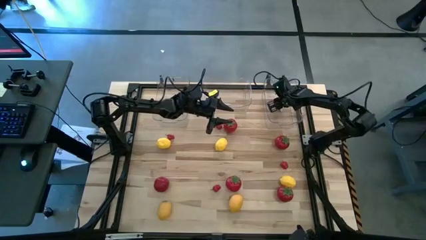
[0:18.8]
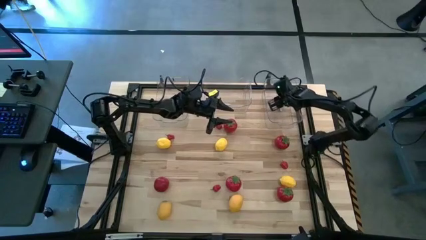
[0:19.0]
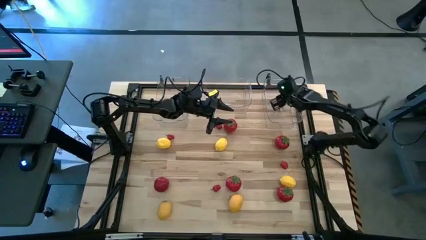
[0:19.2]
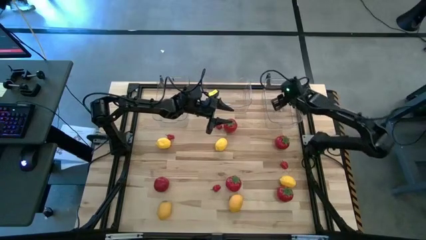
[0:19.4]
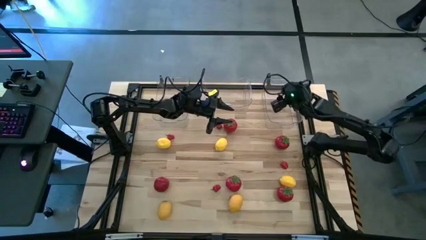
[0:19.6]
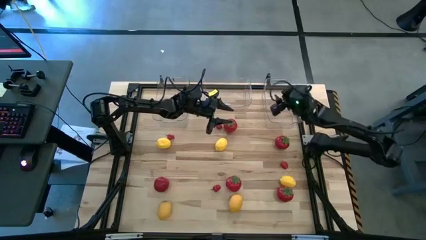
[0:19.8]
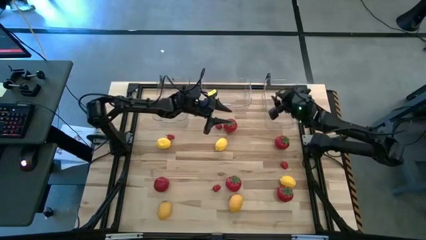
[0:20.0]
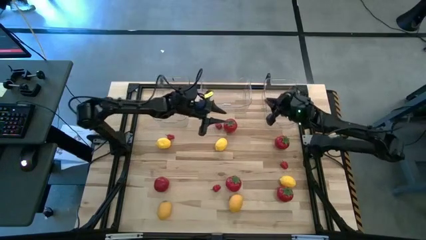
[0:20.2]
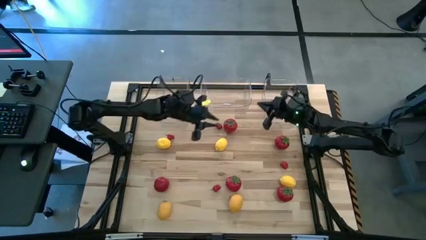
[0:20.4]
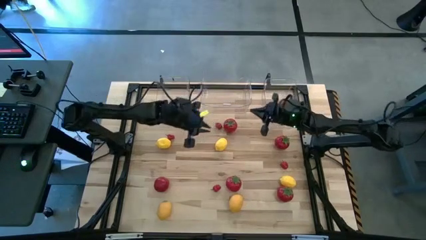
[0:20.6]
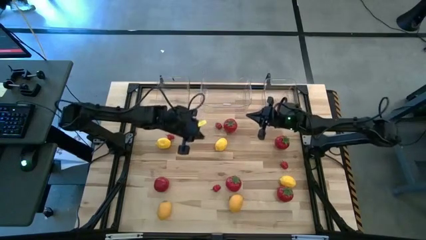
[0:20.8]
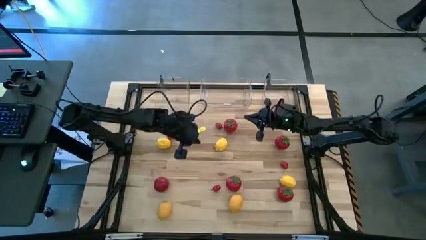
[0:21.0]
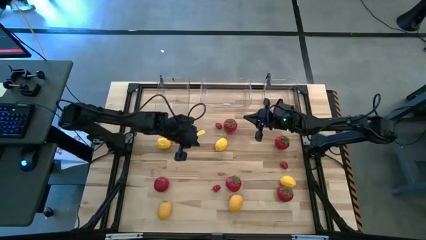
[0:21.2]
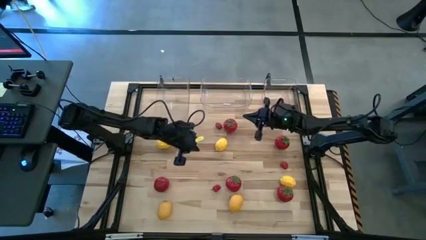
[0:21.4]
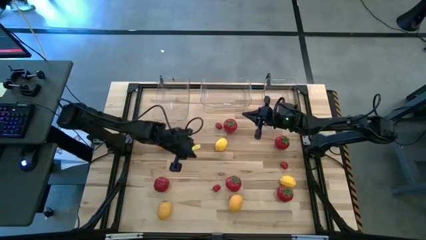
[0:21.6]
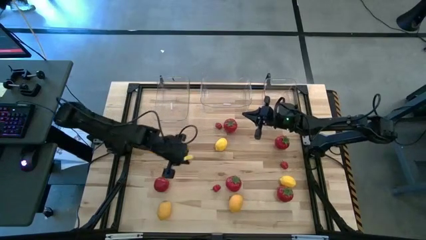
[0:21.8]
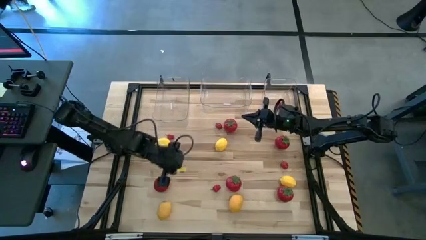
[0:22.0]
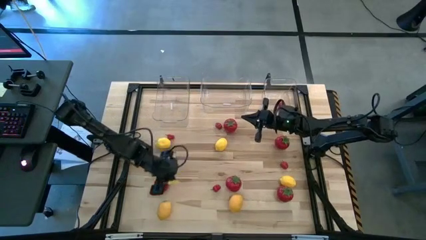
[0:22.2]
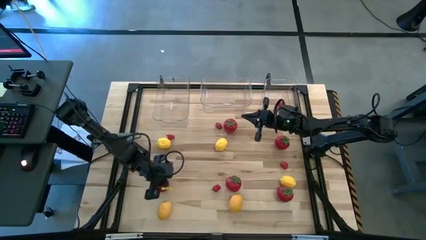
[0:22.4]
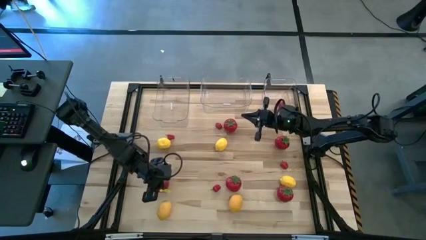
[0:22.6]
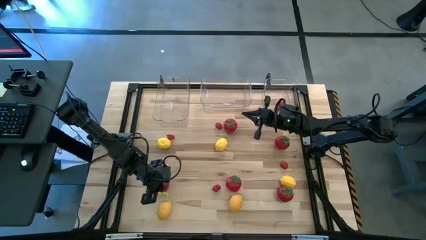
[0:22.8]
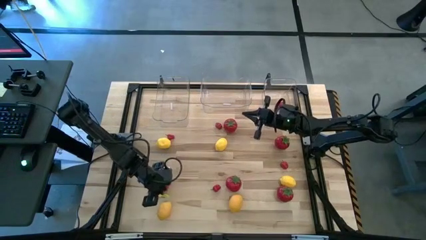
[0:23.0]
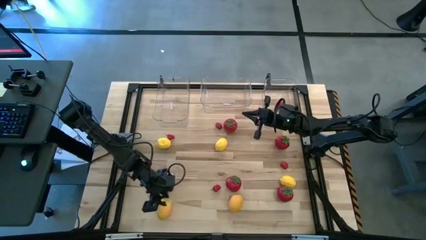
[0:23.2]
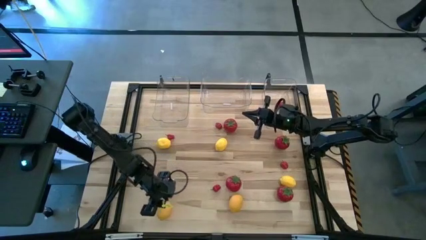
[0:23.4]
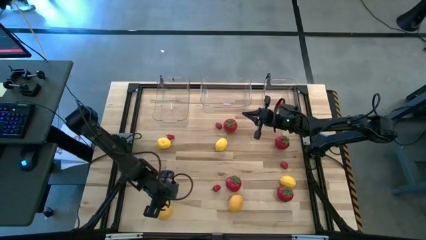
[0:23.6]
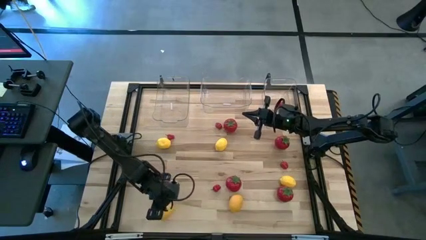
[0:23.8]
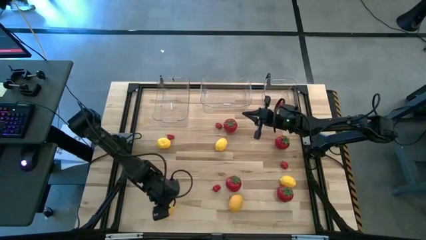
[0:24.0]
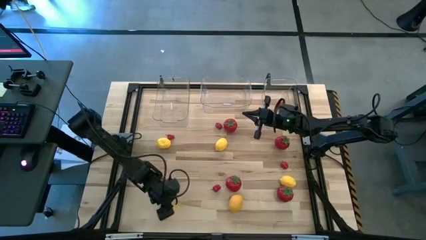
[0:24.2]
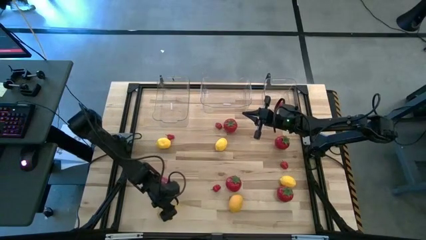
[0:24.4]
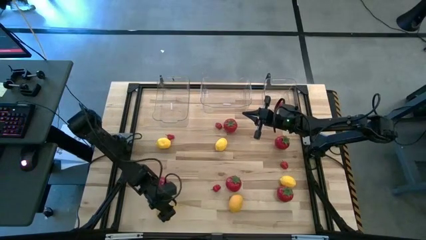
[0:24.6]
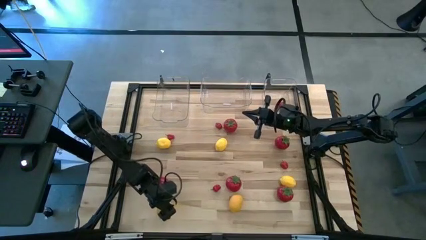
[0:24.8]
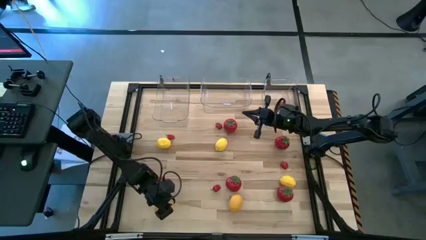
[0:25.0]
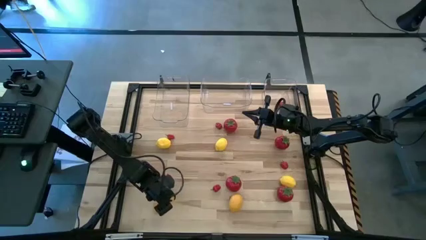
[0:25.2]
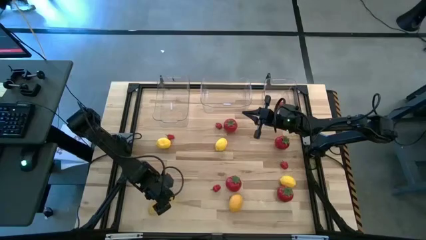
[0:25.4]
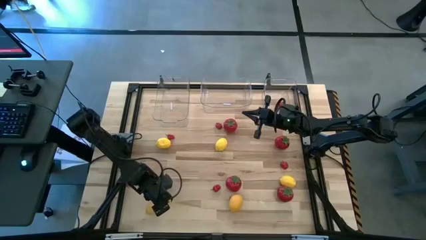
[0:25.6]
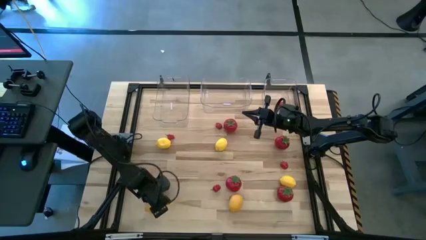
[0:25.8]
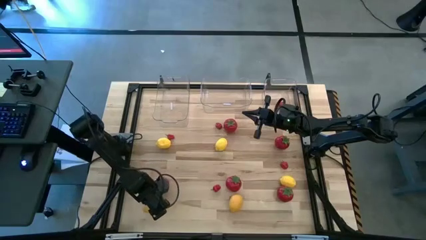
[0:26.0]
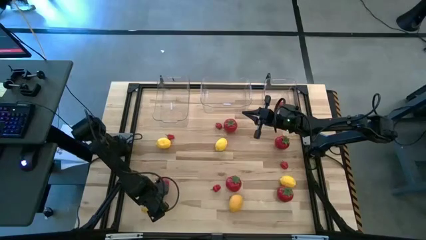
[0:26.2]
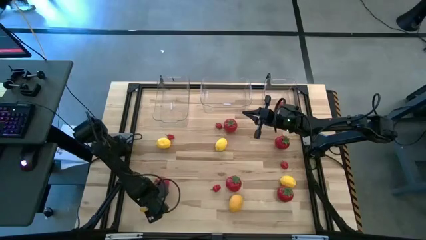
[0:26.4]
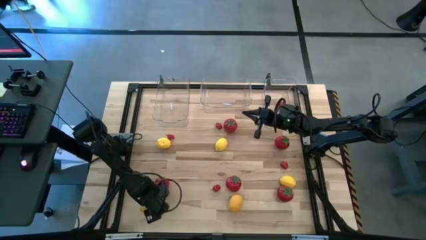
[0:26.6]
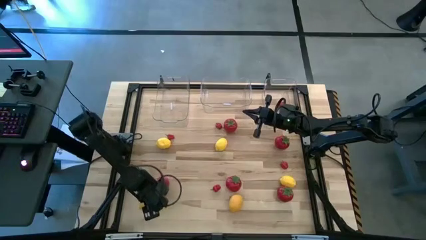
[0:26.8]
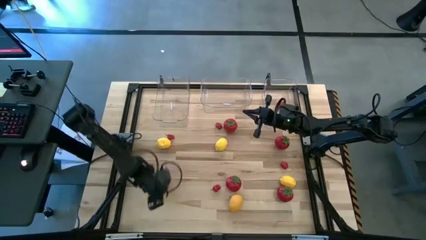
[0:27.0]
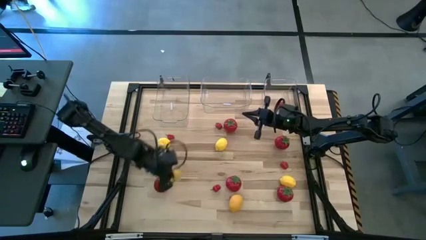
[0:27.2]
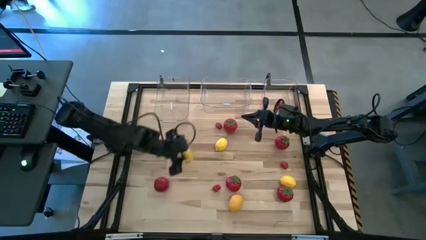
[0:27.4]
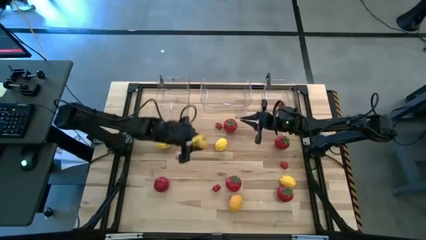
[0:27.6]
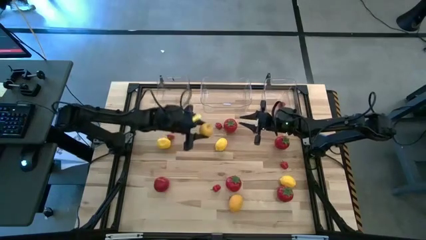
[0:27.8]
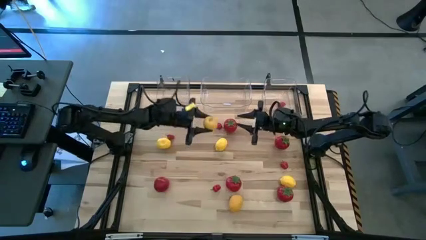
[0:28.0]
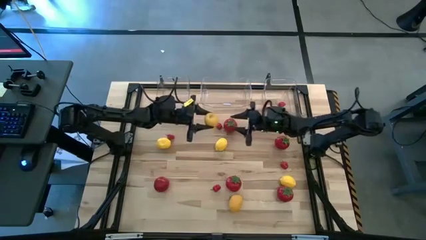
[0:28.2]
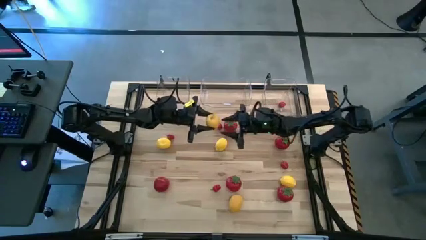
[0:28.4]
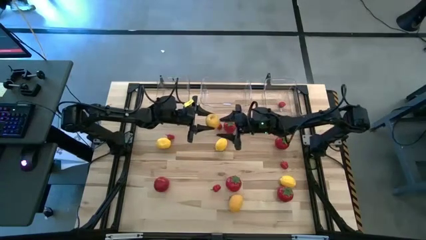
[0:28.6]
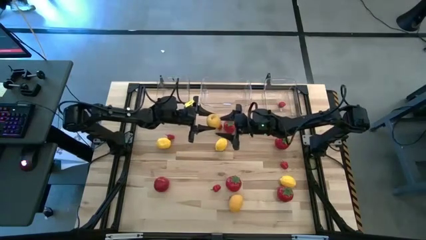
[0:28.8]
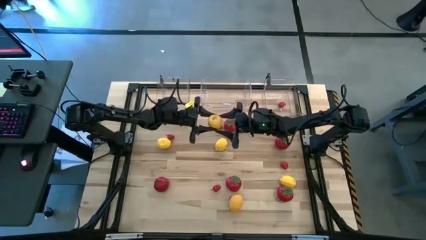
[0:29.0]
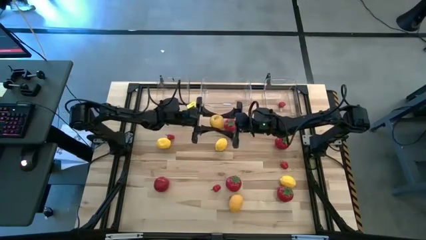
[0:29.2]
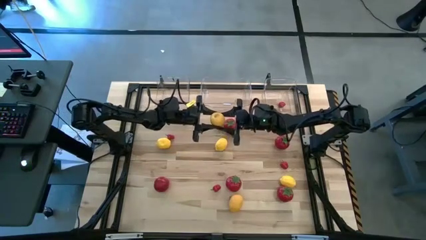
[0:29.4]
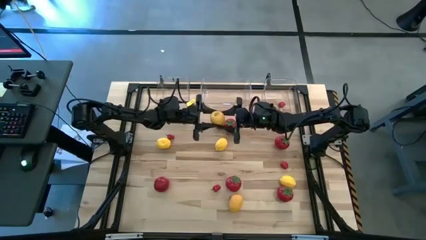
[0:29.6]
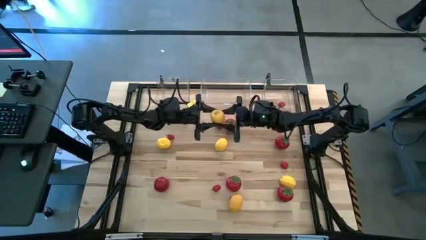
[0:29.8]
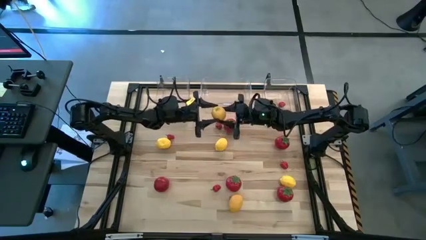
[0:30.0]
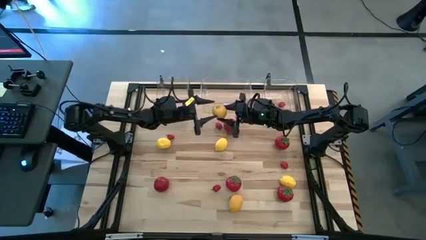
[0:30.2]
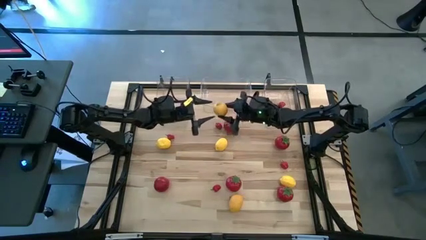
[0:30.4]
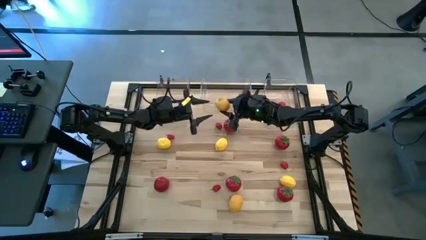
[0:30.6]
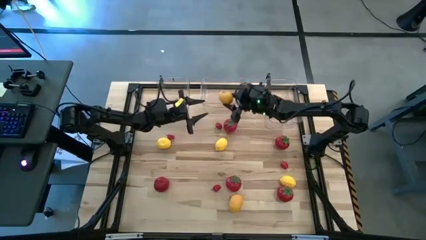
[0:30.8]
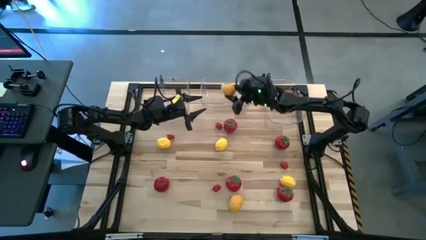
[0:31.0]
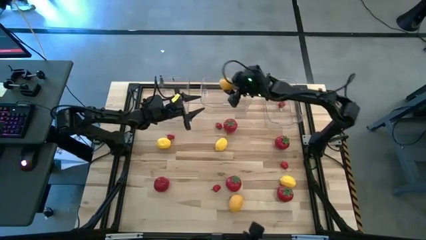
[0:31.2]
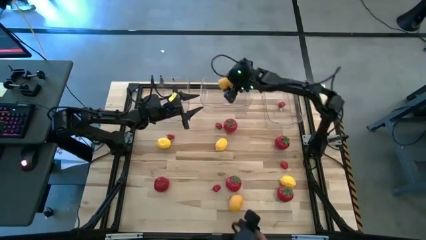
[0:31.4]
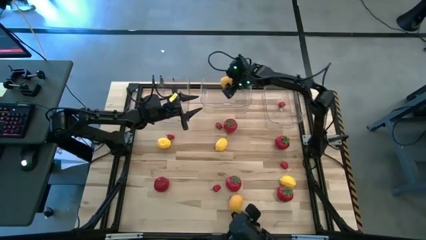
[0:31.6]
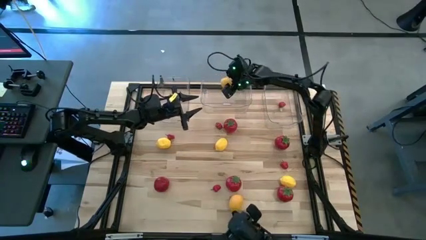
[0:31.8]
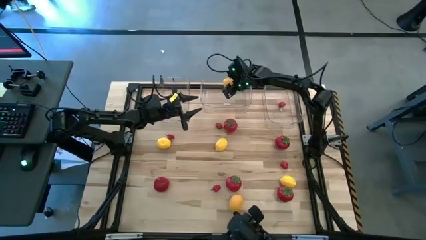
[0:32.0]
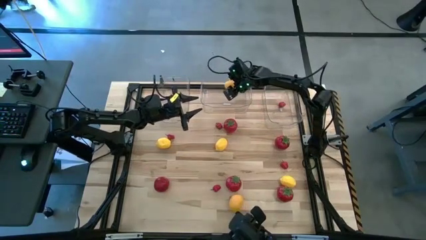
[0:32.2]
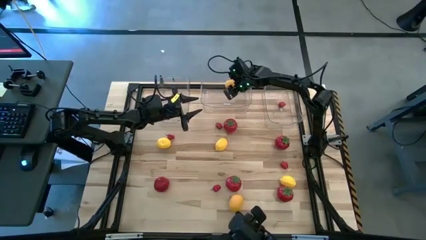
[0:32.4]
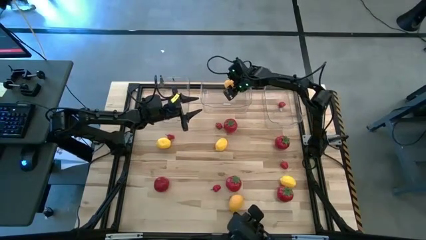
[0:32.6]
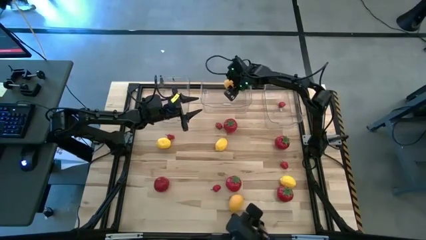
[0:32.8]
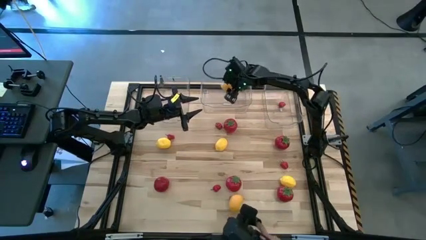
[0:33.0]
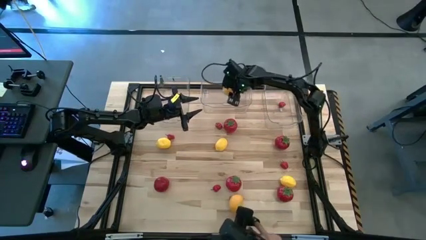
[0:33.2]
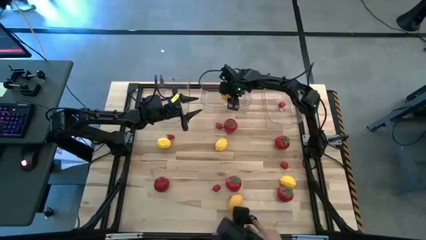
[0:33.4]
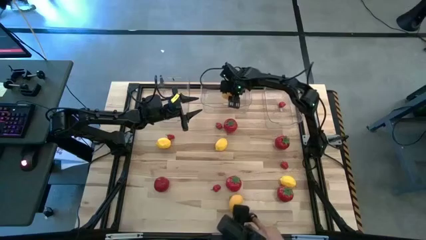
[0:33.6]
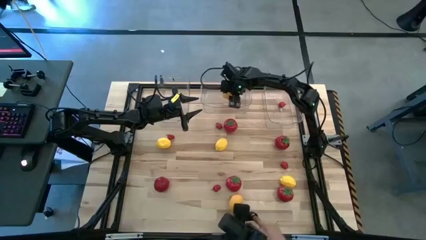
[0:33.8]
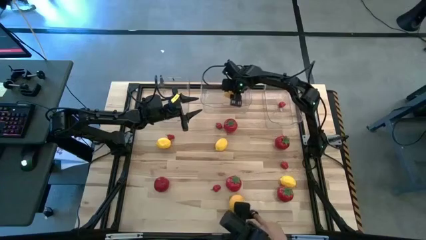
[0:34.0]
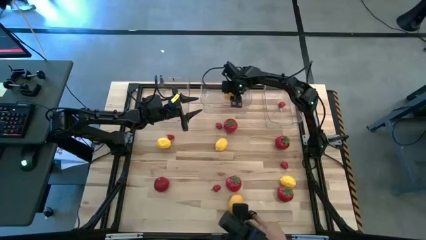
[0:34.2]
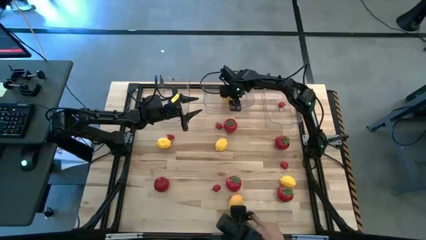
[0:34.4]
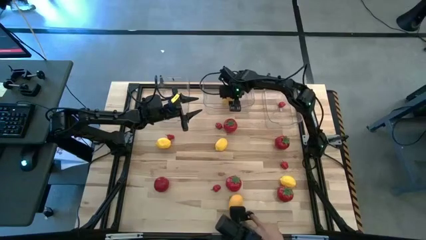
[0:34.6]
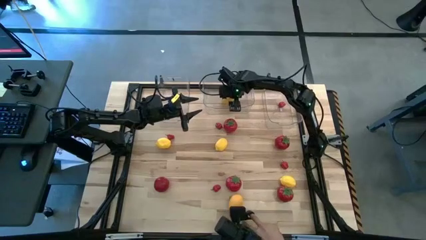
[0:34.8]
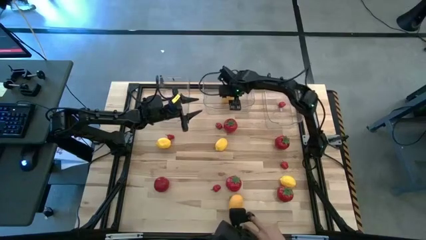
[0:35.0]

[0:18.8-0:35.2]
Task: Sort produce into baskets
Put the yellow lemon into the center transparent bin
